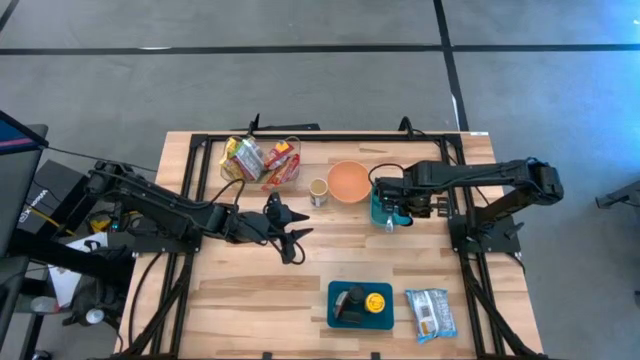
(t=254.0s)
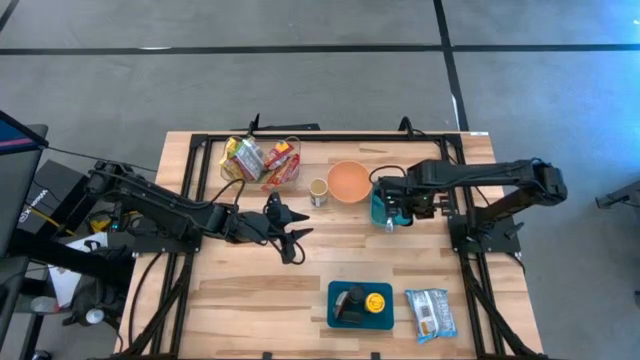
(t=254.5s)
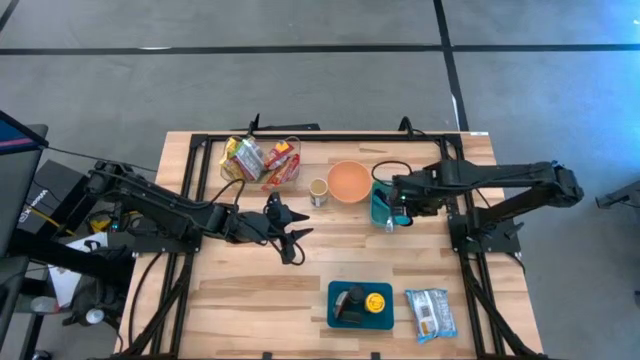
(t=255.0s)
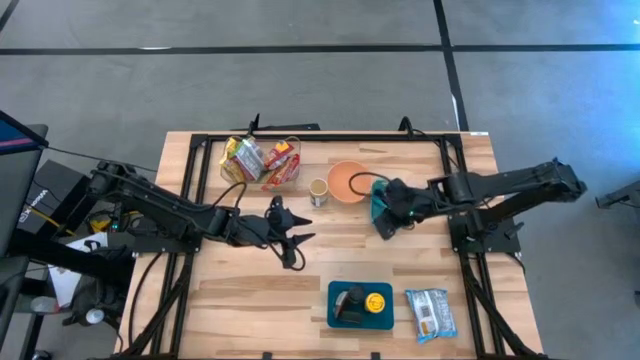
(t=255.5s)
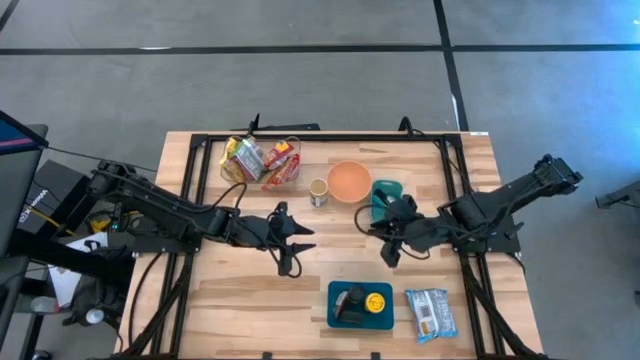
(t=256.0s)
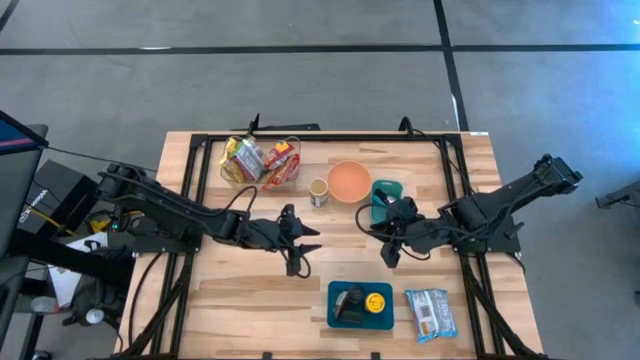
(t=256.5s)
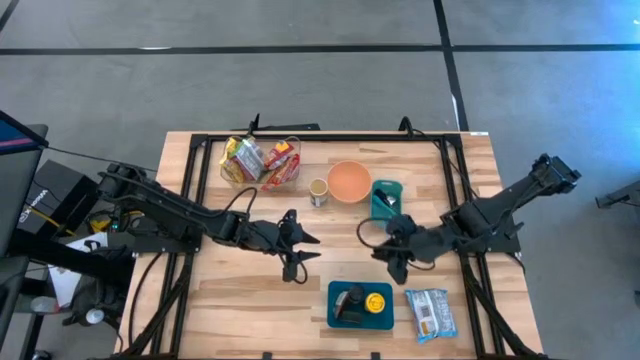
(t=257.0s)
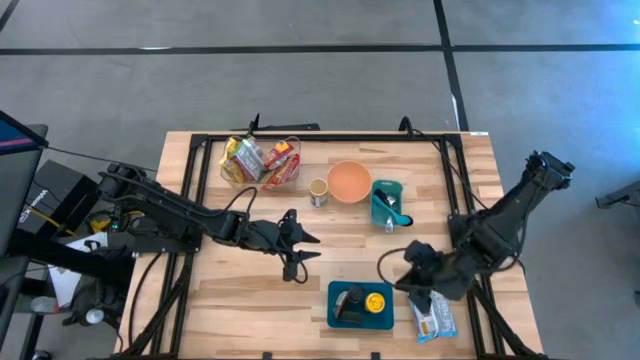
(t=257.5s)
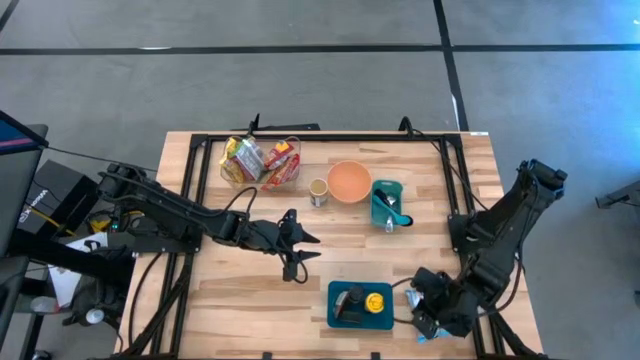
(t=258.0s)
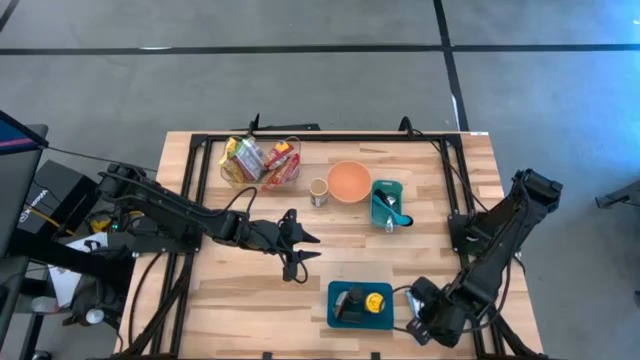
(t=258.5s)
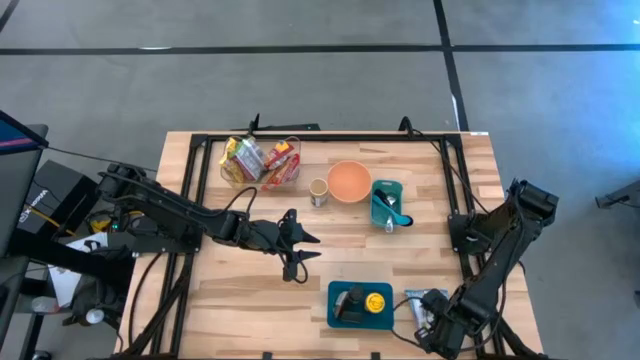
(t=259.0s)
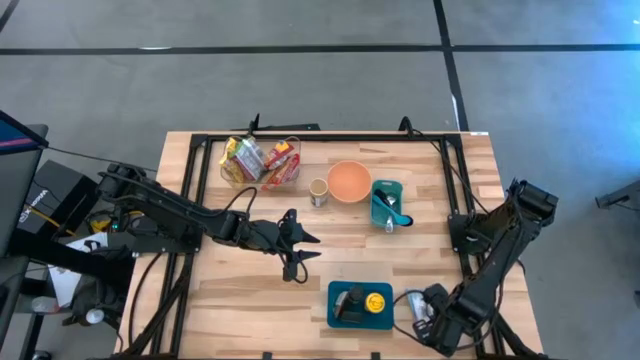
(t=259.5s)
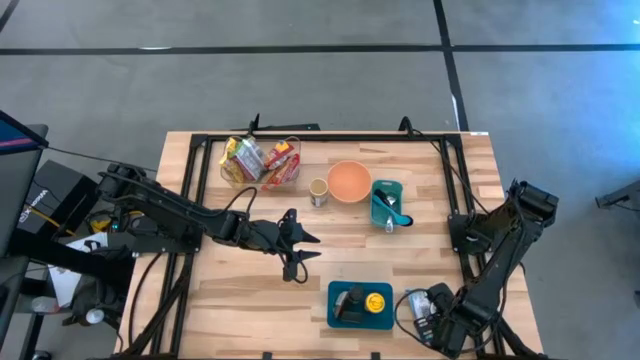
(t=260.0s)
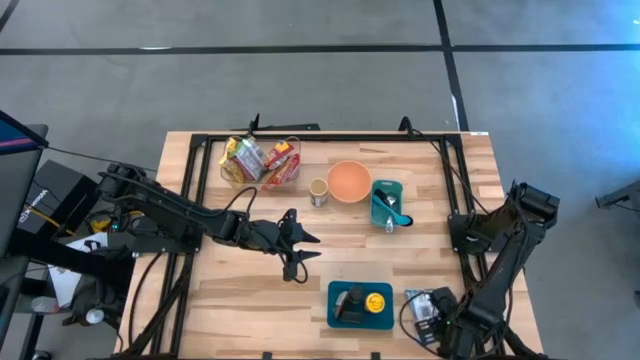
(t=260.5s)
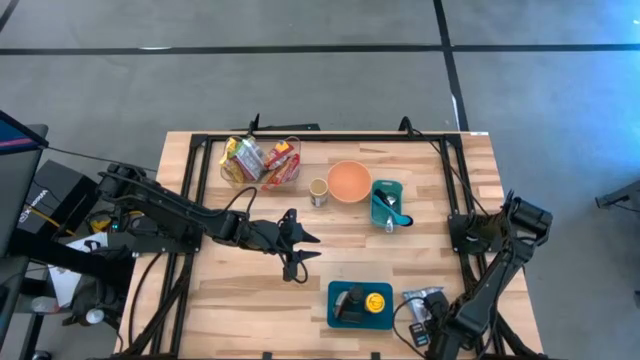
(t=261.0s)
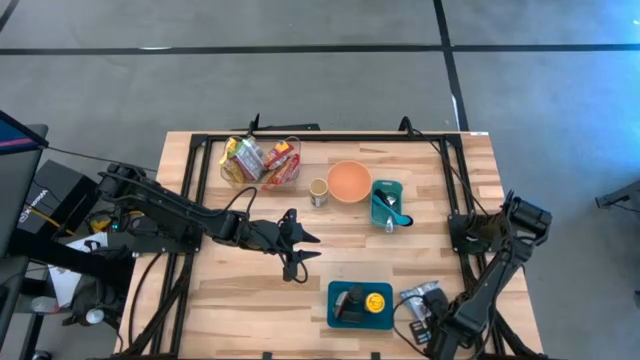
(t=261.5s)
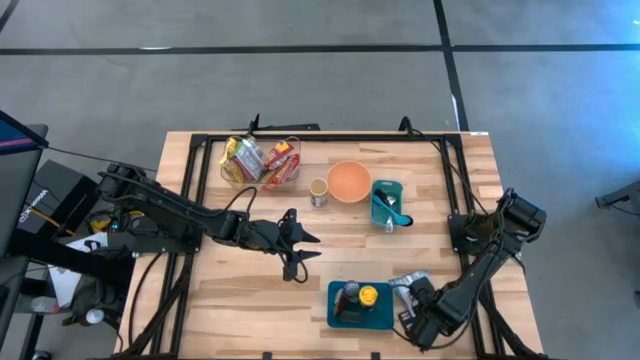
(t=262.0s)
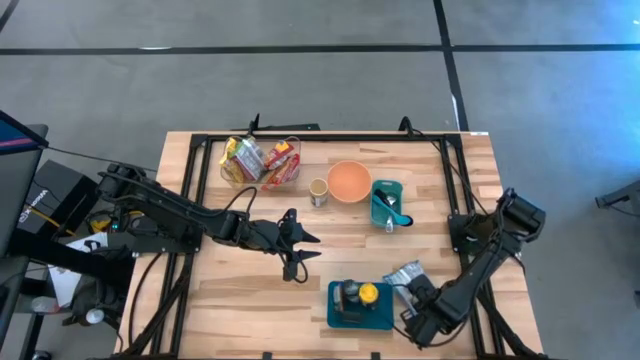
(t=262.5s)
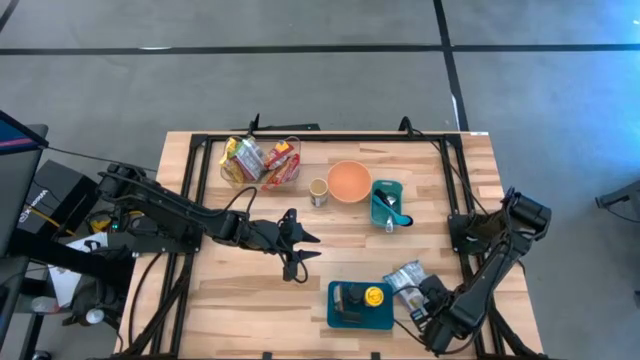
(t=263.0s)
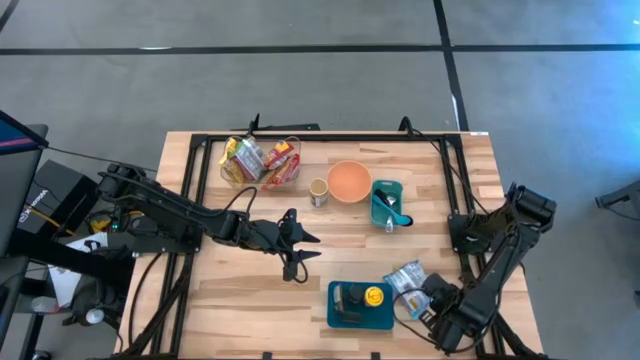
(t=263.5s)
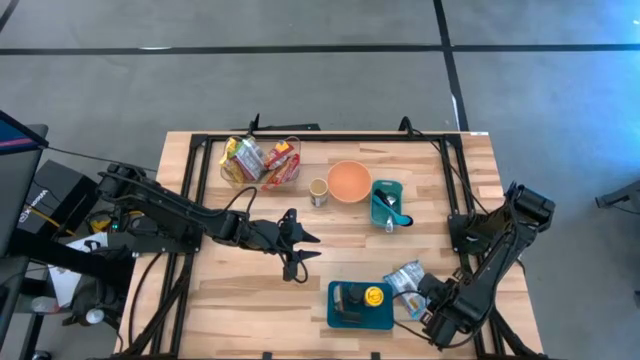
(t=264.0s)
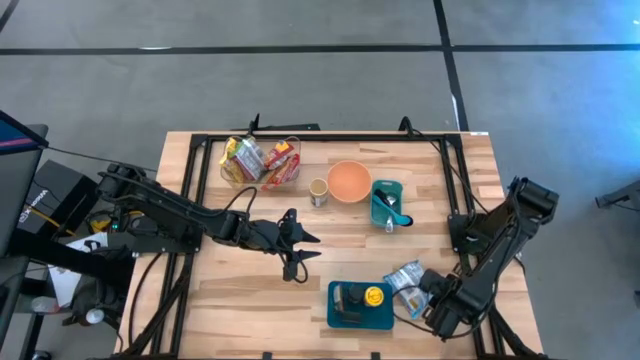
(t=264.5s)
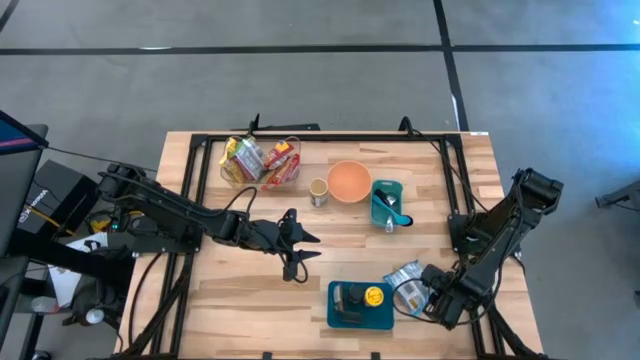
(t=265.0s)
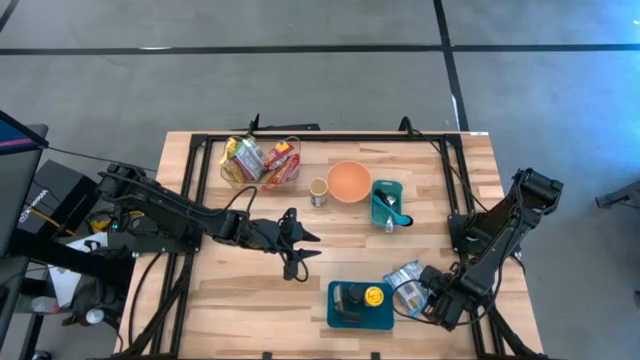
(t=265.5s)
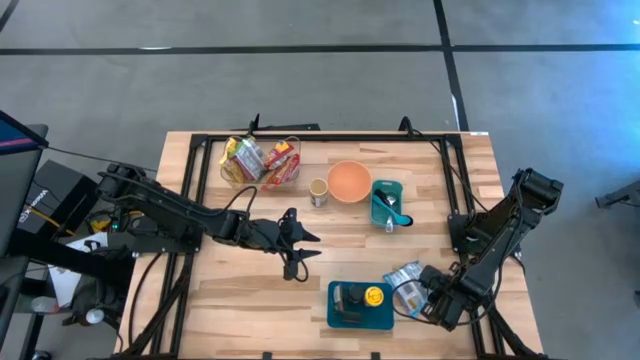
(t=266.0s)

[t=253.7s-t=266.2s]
Task: Pick & Place Food Item
Put the blue noodle pack into the transparent bin

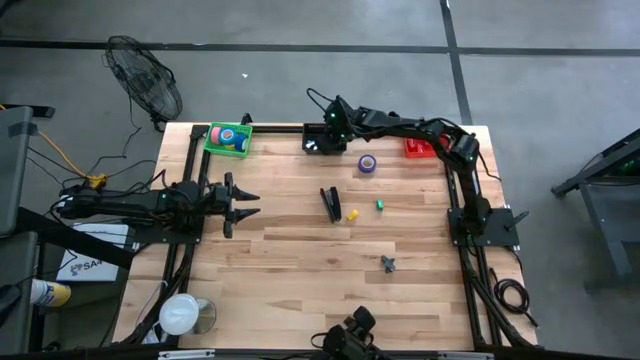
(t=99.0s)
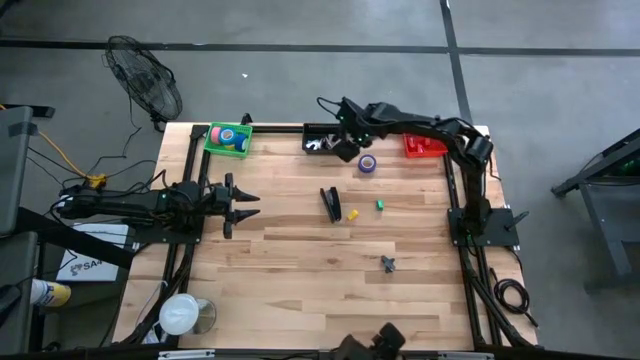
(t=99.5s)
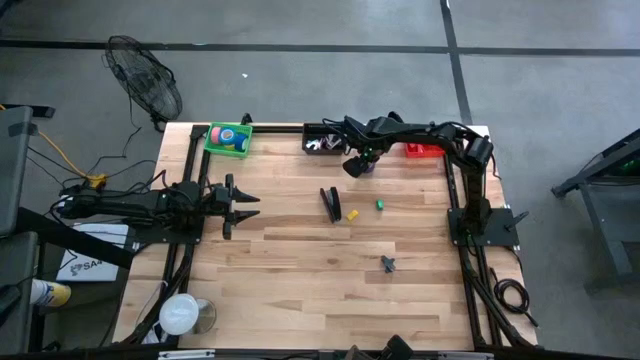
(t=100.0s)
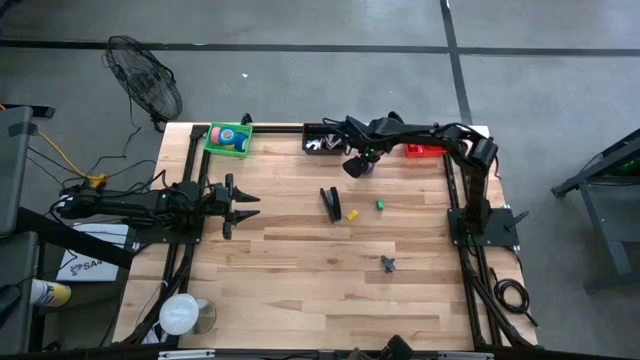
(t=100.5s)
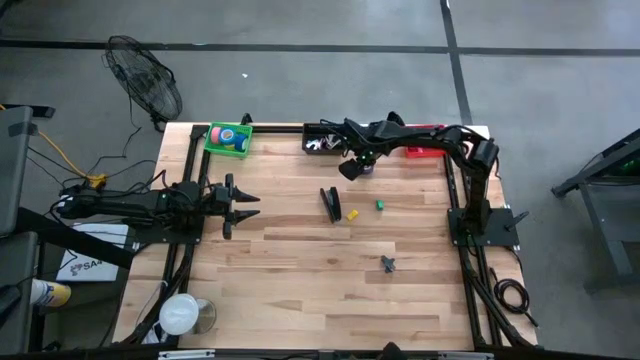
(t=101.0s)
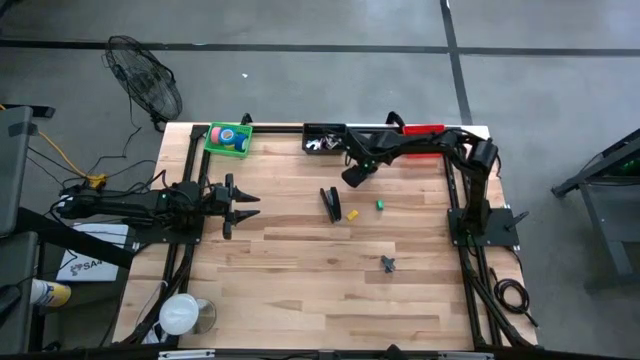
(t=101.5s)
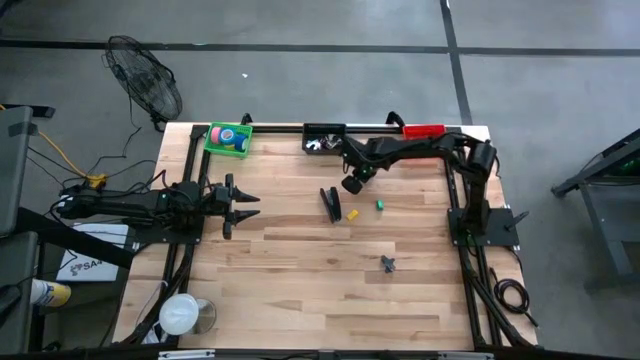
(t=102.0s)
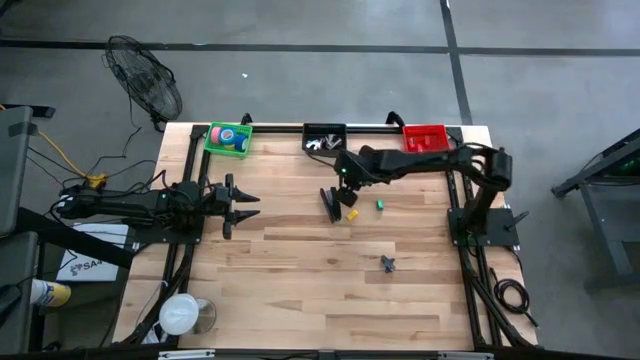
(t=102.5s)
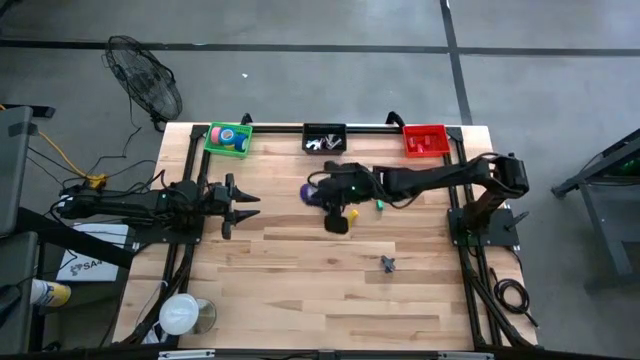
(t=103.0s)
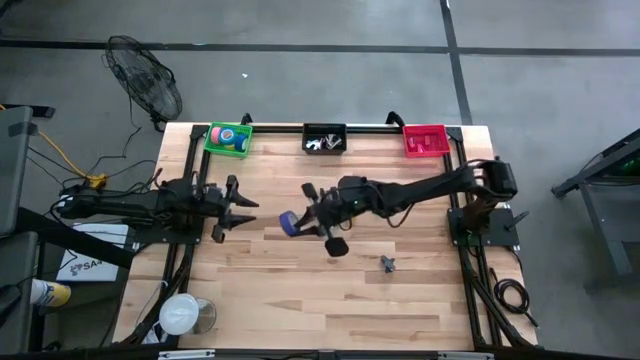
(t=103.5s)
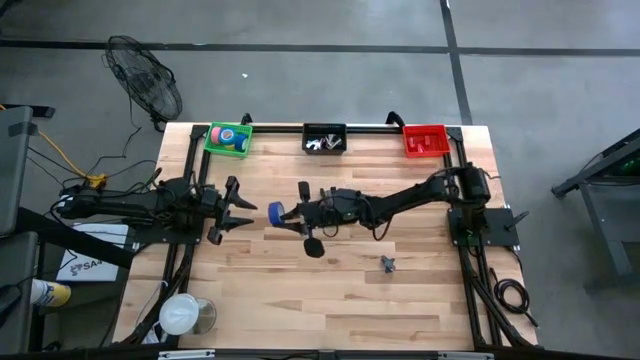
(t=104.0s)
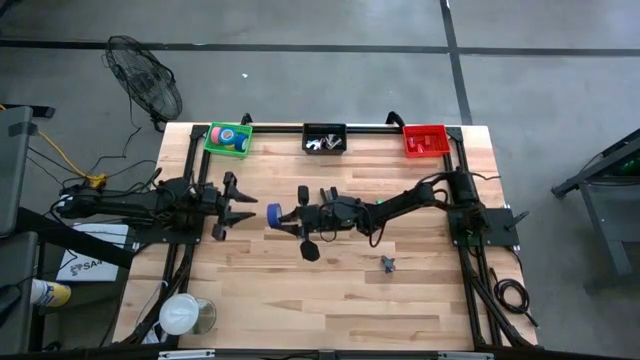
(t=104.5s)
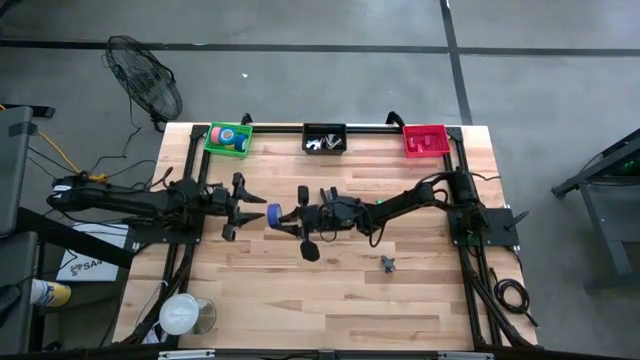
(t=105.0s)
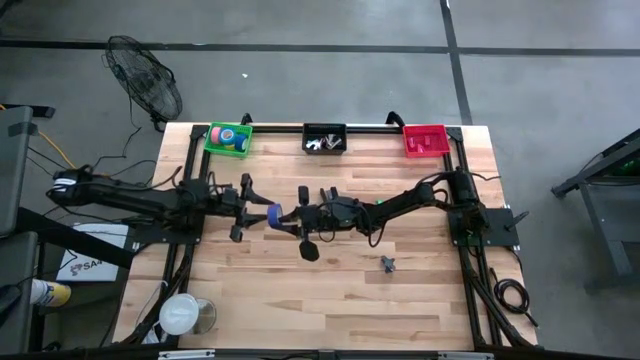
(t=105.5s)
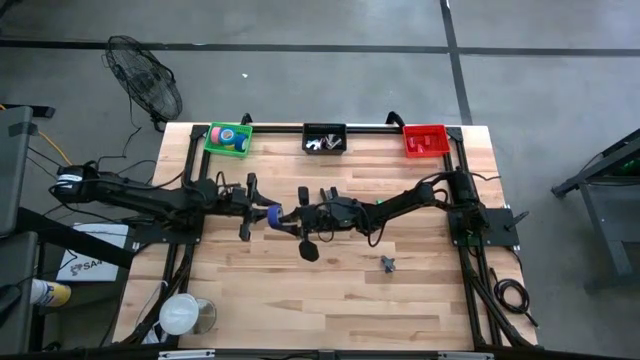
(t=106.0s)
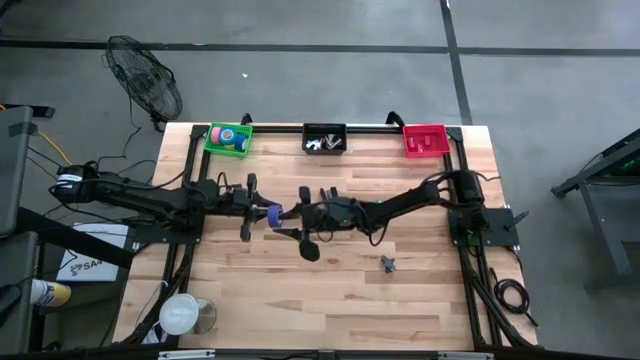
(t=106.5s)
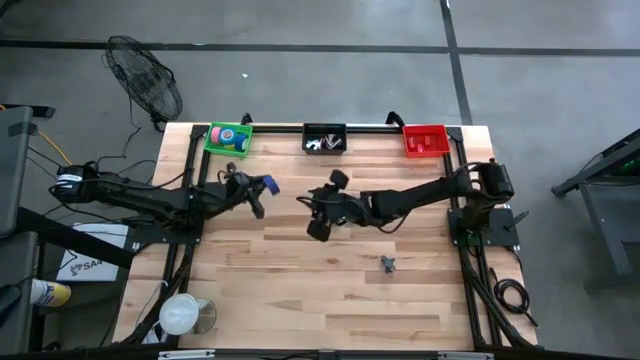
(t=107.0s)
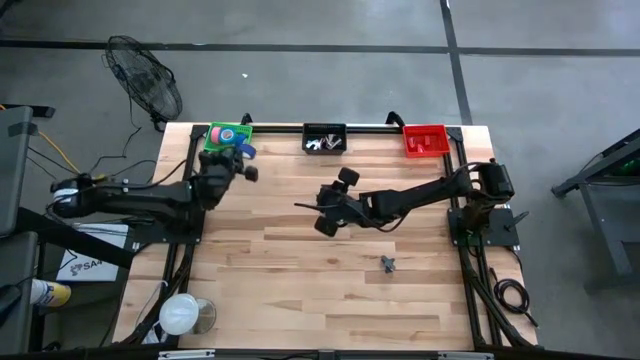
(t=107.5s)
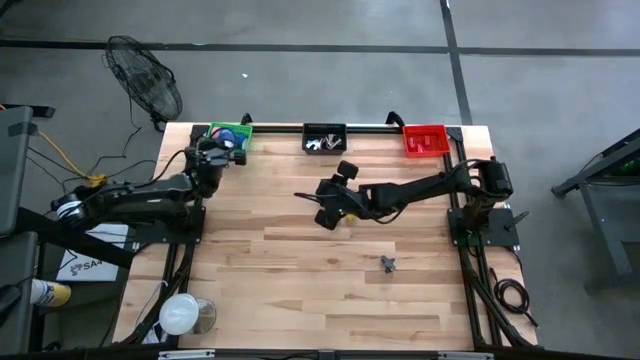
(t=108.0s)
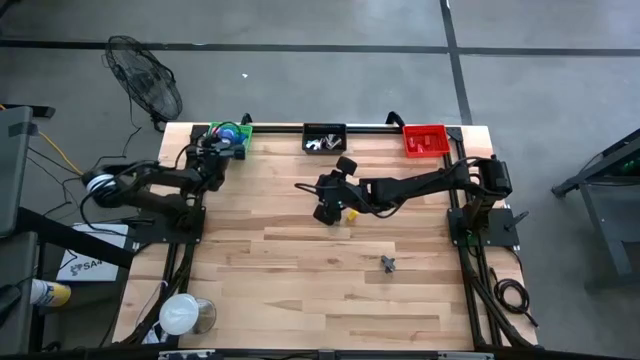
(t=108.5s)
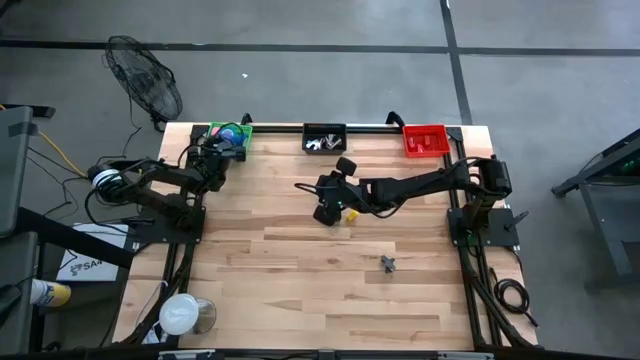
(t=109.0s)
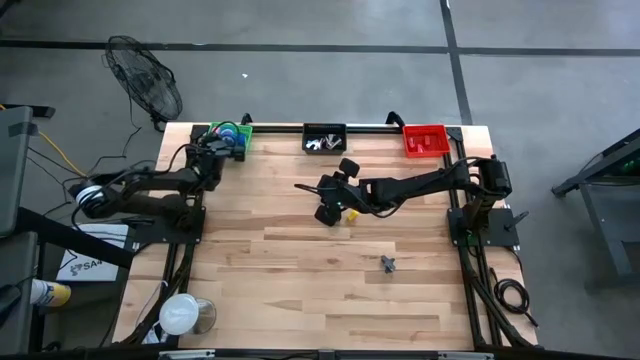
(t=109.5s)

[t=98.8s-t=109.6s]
Task: Pick and place Stapler, Stapler remover, tape
Put the purple tape in the green bin
